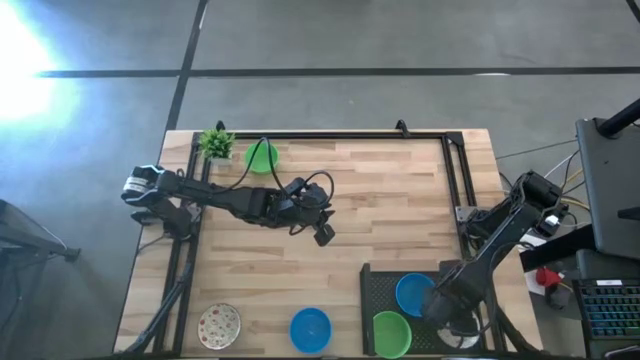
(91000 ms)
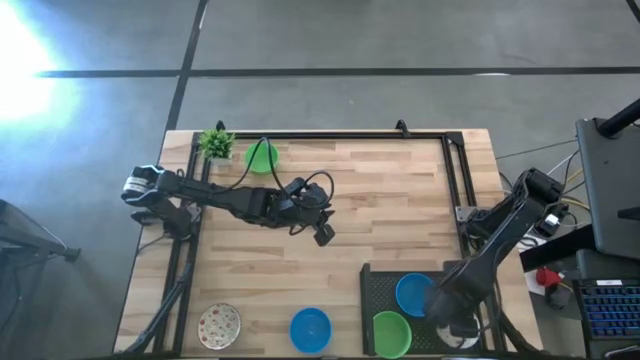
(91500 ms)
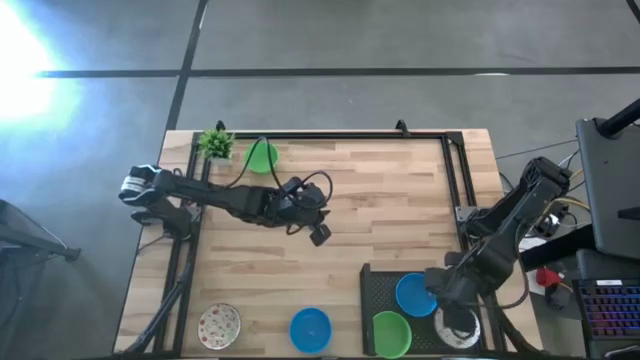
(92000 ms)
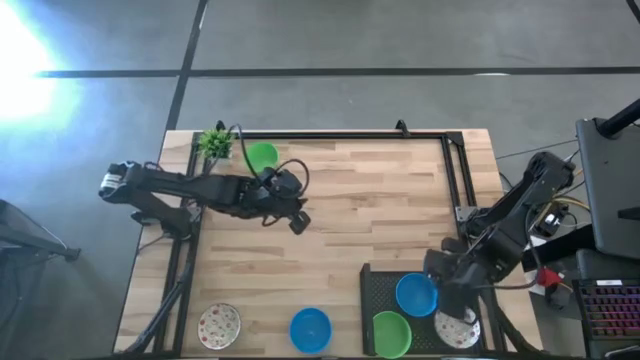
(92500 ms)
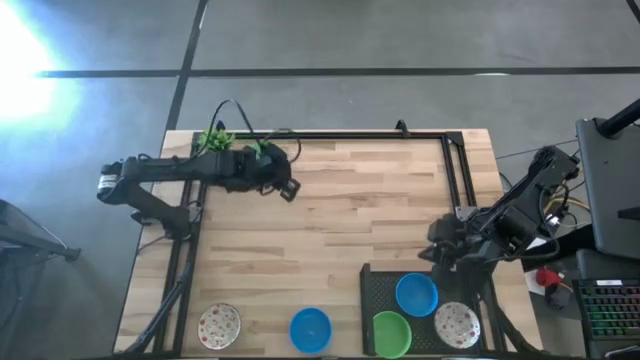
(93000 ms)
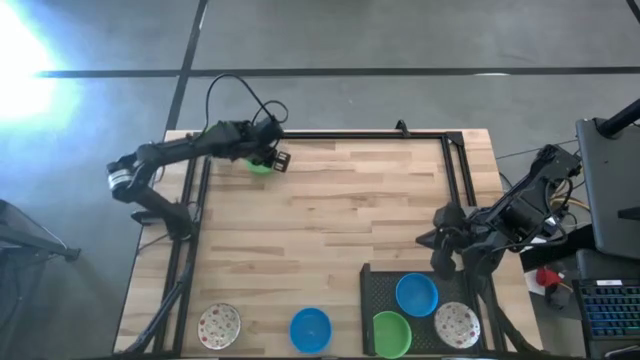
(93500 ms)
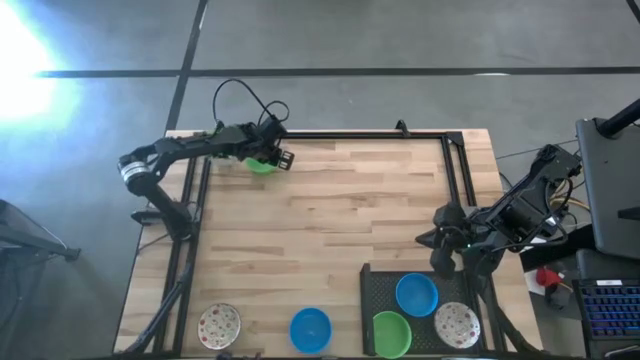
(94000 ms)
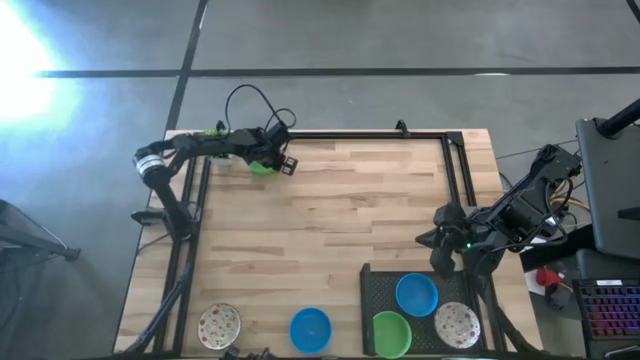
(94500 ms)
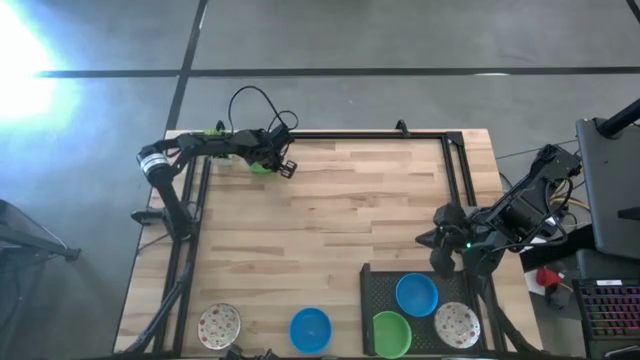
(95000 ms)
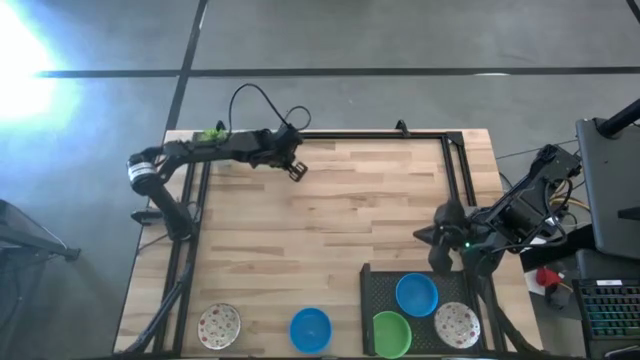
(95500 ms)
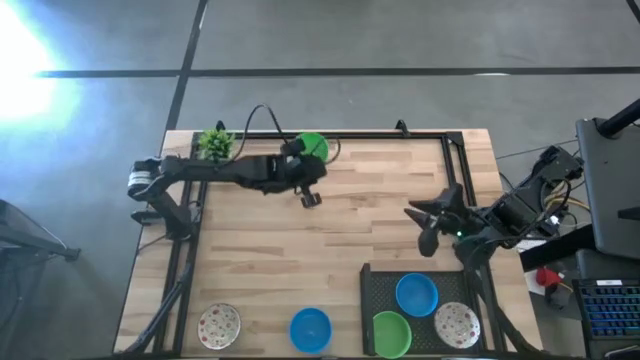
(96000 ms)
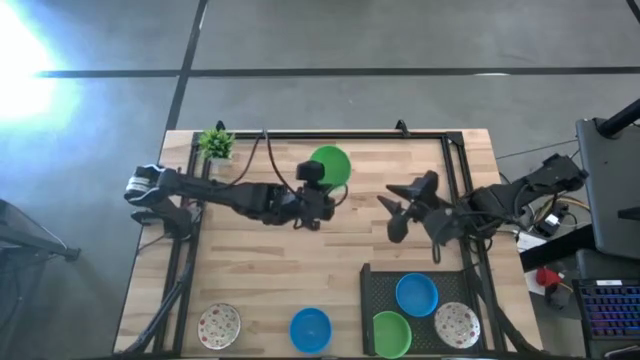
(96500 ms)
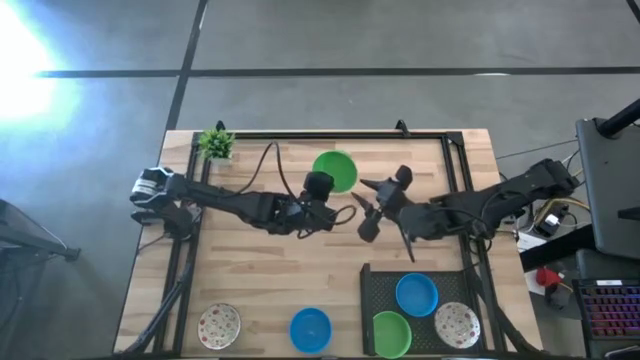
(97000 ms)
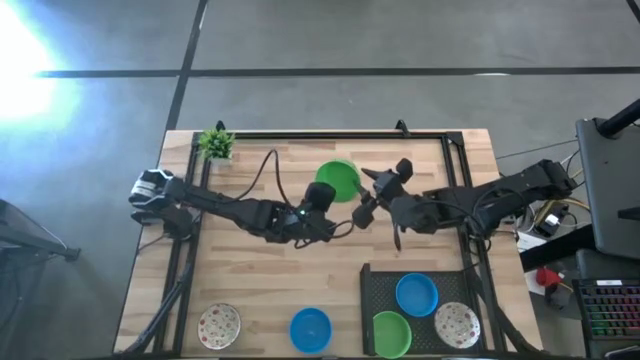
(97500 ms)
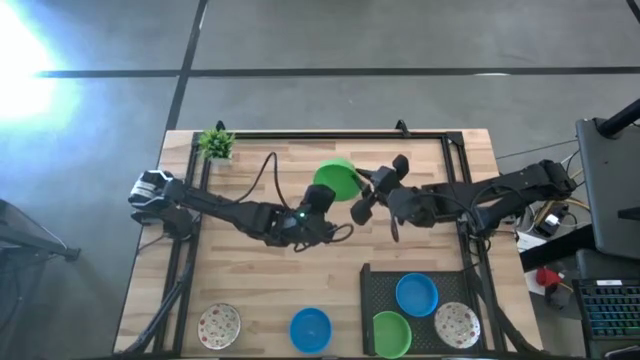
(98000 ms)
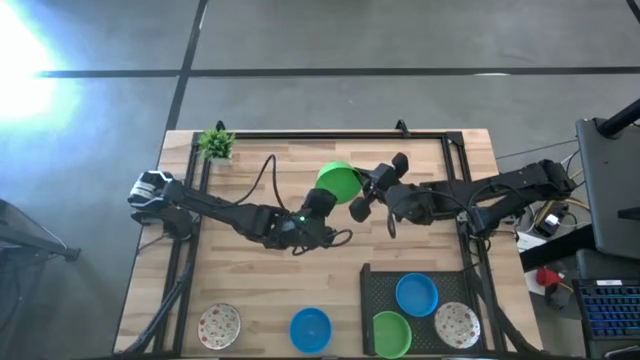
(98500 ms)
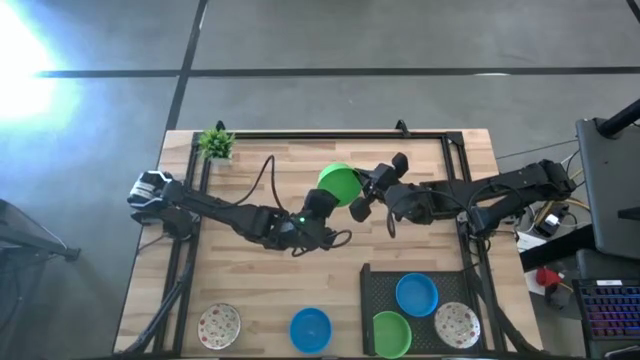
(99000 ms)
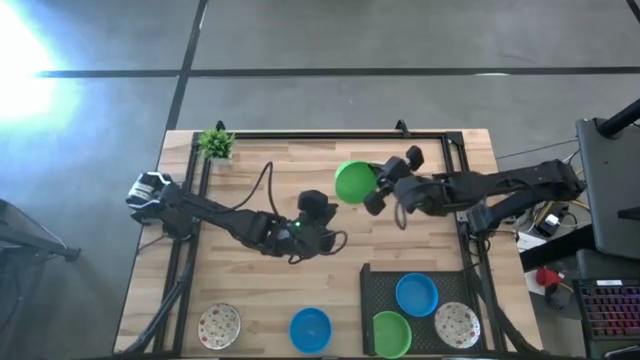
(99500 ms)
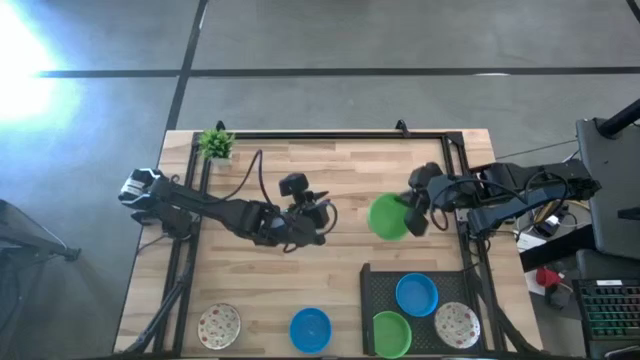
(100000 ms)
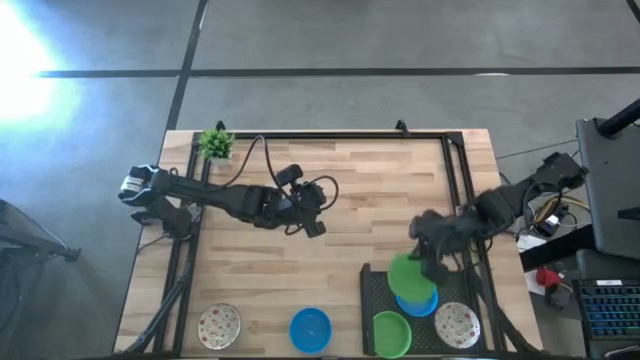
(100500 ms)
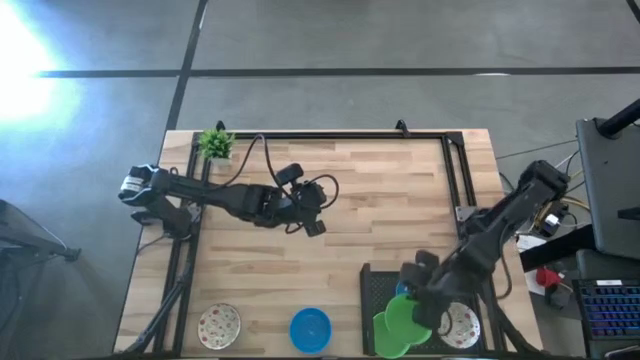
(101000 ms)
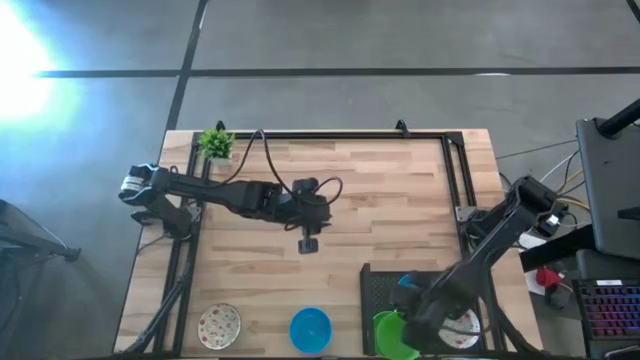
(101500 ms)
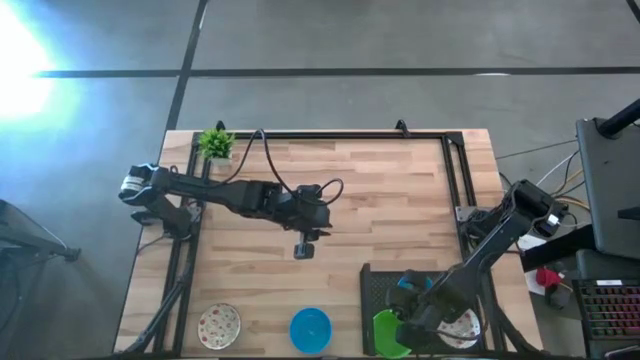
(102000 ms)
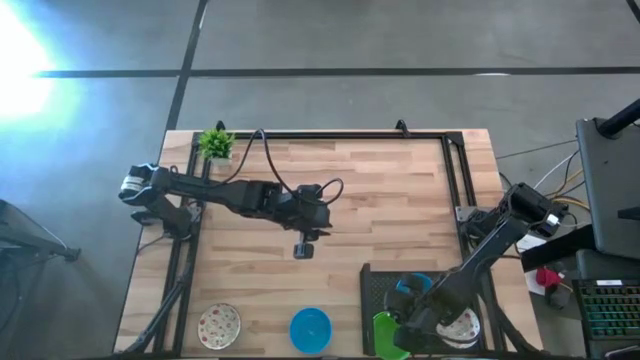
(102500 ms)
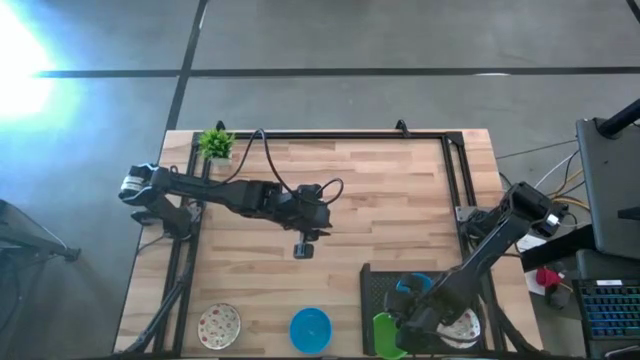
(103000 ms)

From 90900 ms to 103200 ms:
Task: Pick & Place Mini bowls
Stack the green bowl on top of the green bowls on the shelf

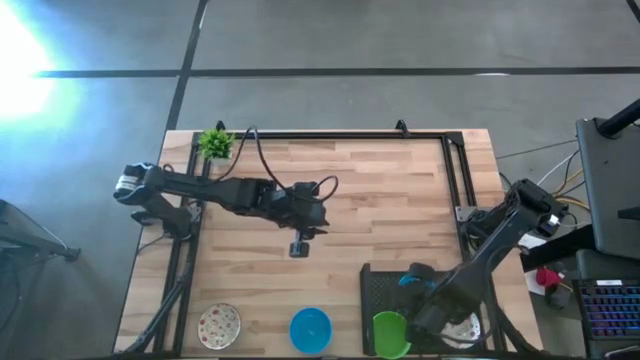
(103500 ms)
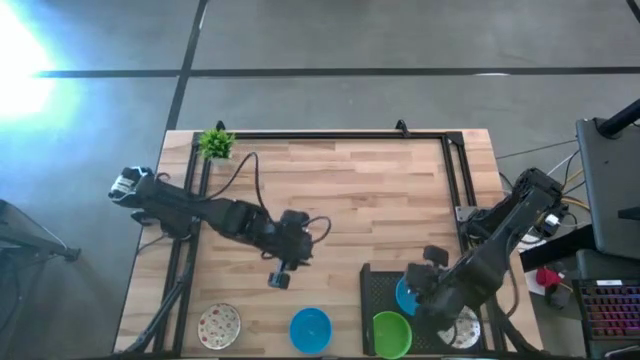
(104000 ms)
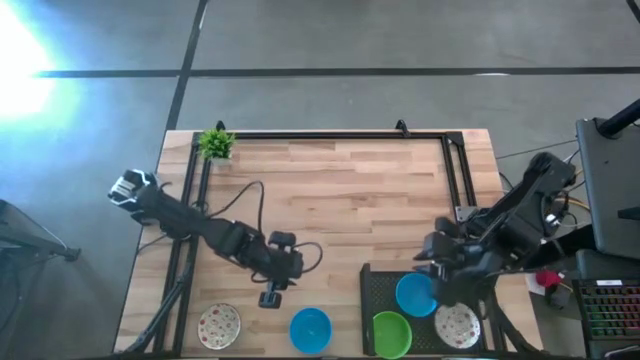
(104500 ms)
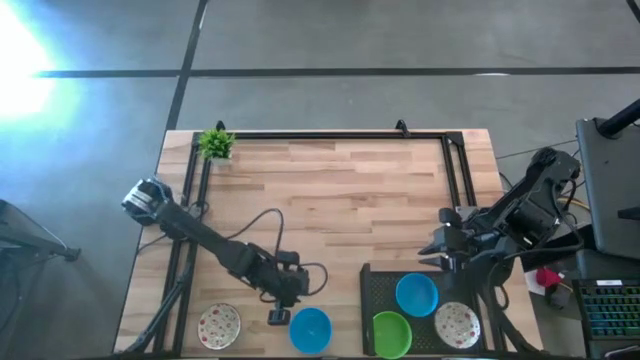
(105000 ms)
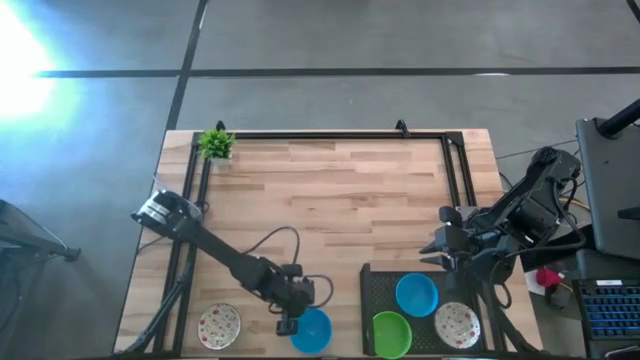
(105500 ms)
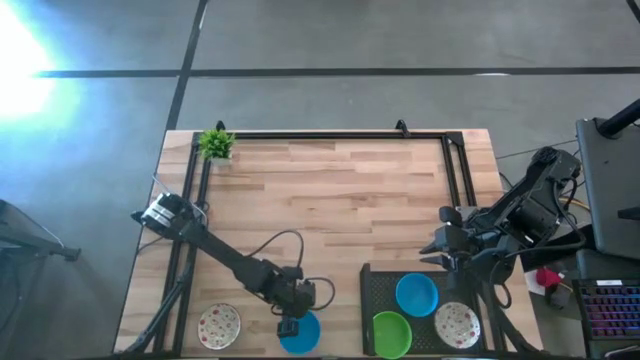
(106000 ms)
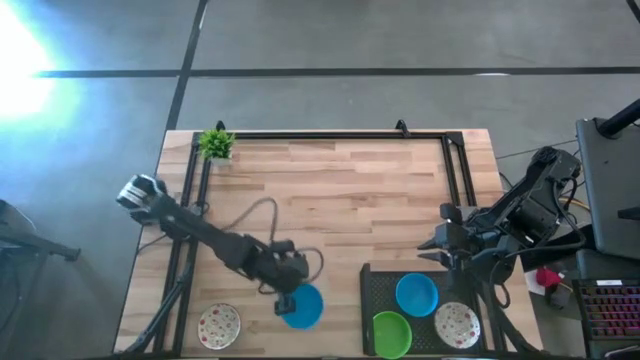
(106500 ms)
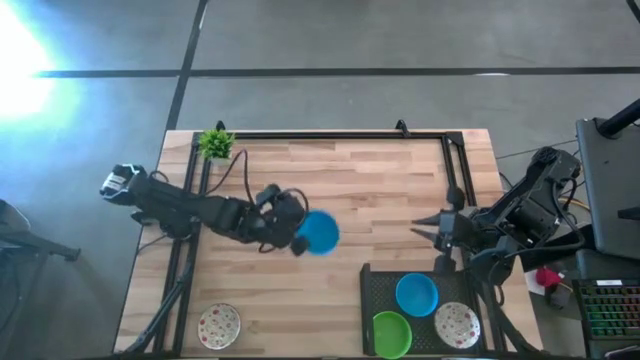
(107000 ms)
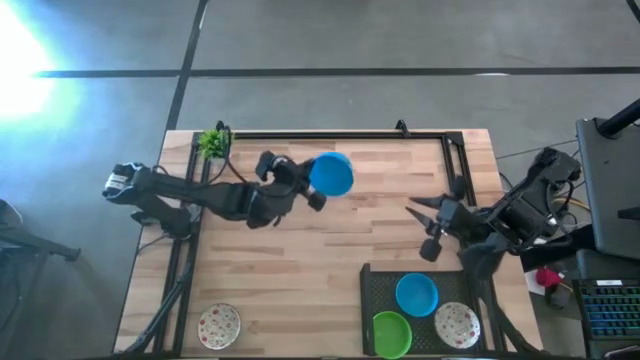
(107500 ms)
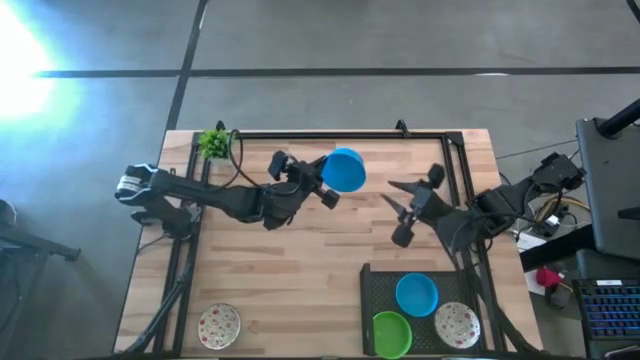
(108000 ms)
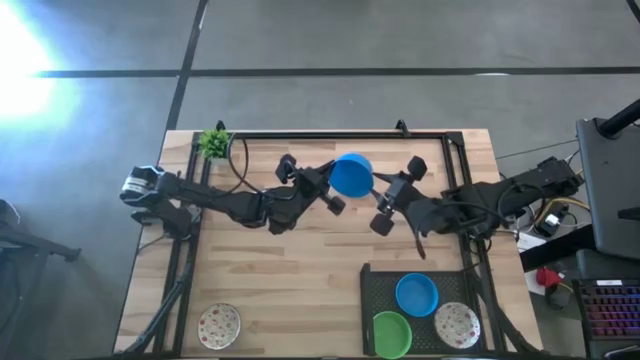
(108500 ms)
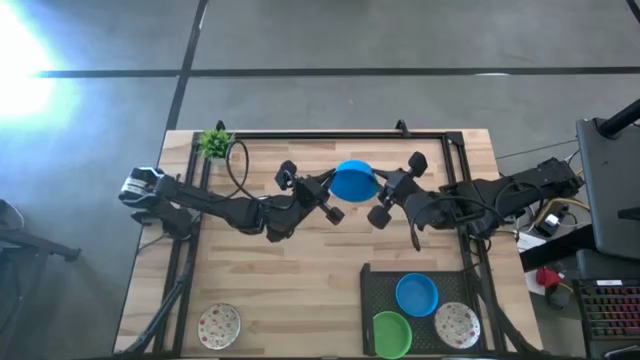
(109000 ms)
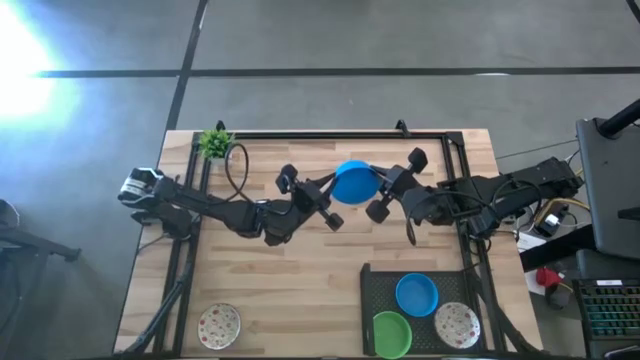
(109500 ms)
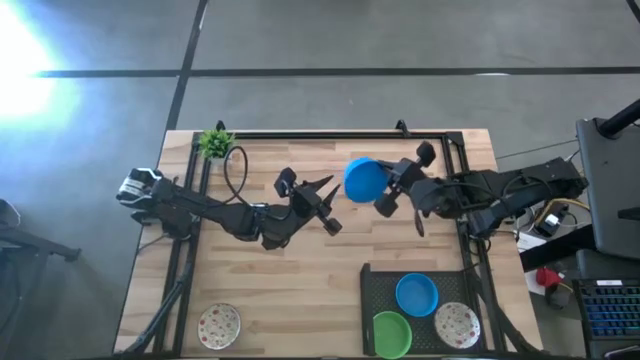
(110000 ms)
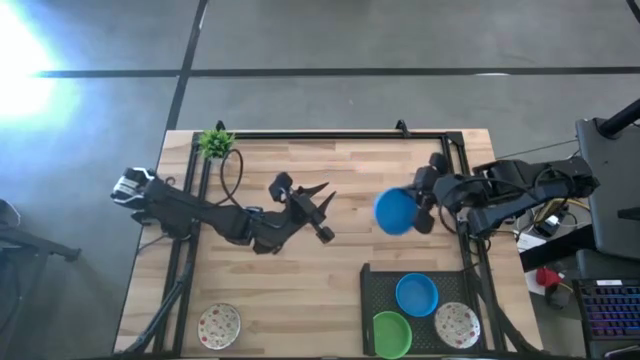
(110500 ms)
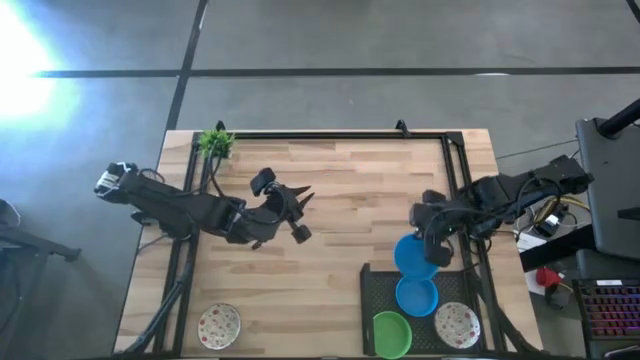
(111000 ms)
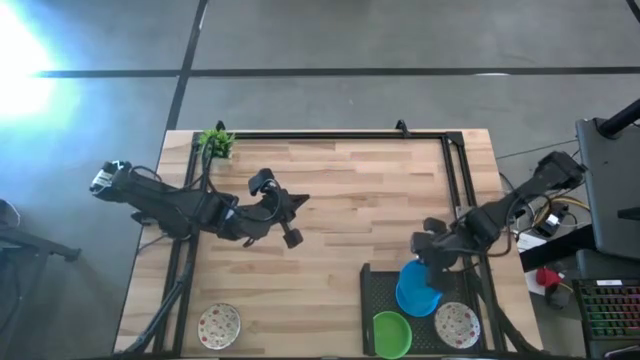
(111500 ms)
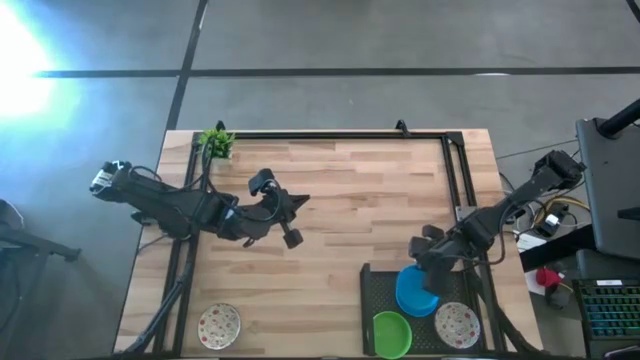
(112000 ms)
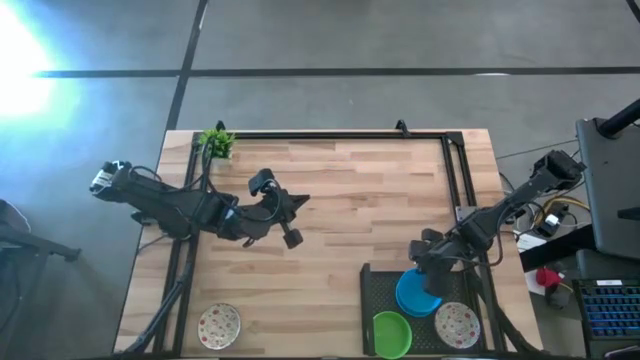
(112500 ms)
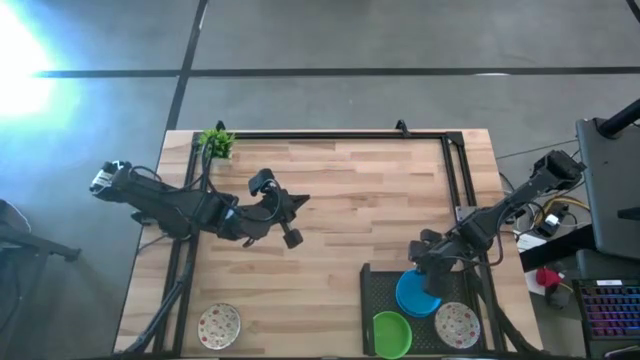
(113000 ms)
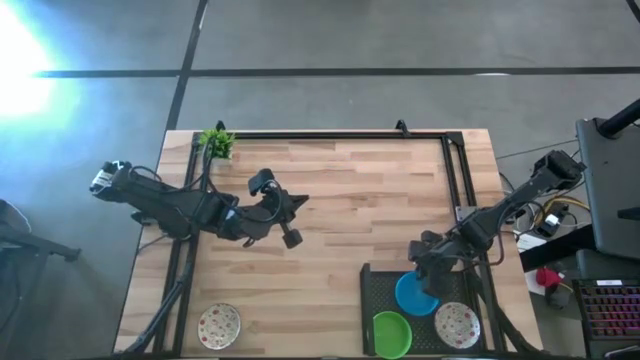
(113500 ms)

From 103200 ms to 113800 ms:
Stack the blue bowl on top of the blue bowls on the shelf
